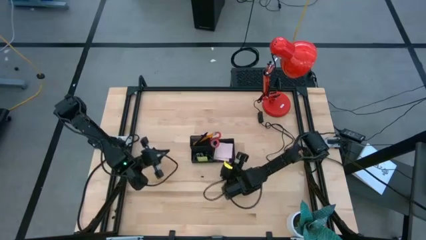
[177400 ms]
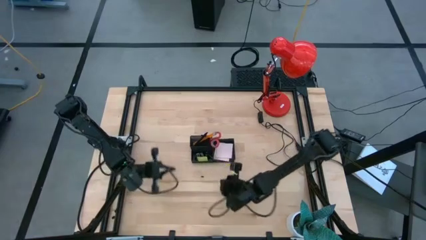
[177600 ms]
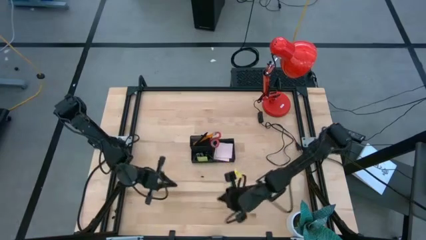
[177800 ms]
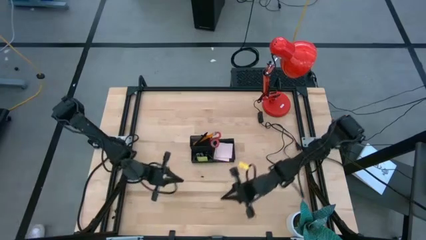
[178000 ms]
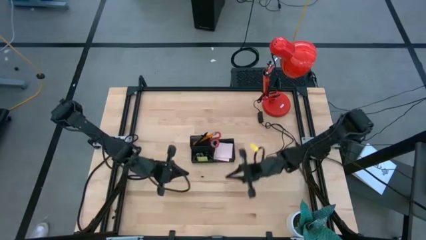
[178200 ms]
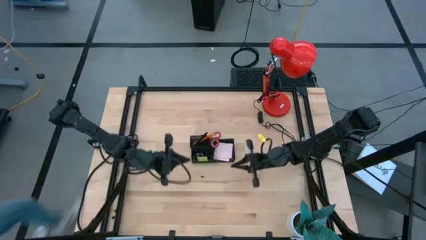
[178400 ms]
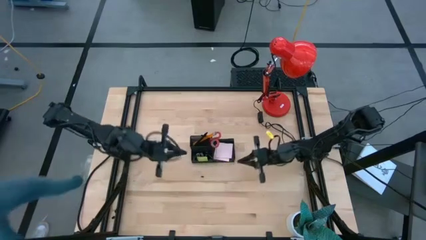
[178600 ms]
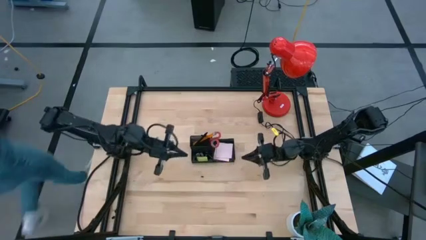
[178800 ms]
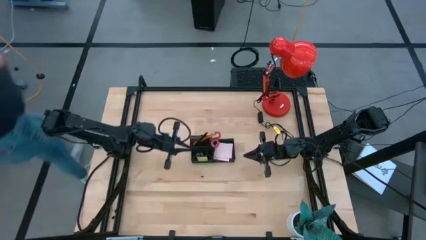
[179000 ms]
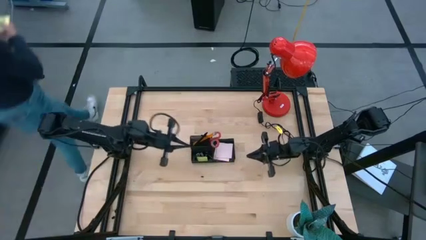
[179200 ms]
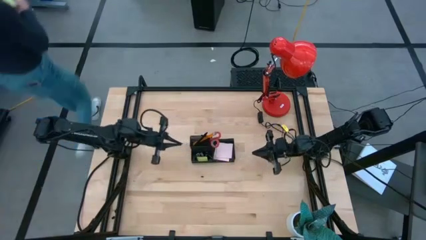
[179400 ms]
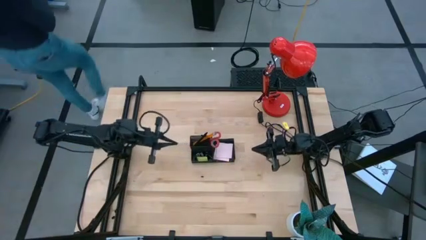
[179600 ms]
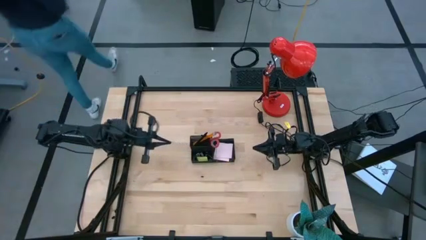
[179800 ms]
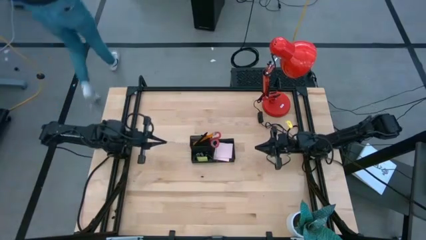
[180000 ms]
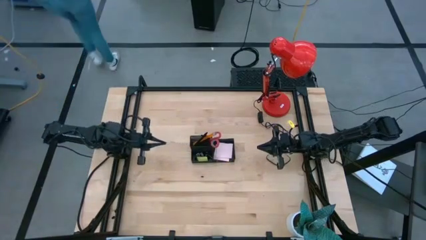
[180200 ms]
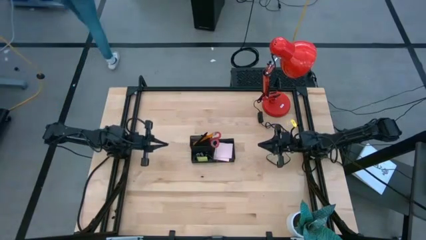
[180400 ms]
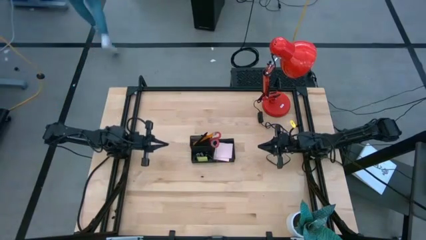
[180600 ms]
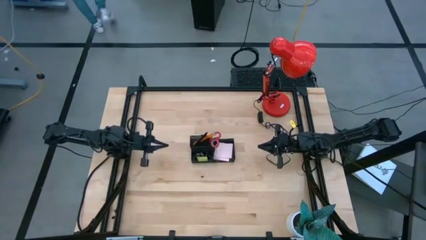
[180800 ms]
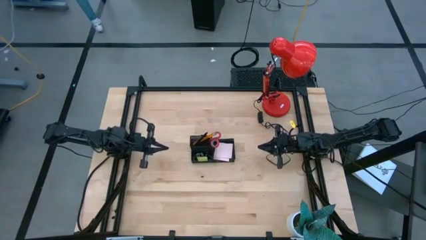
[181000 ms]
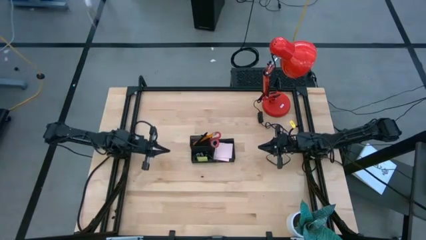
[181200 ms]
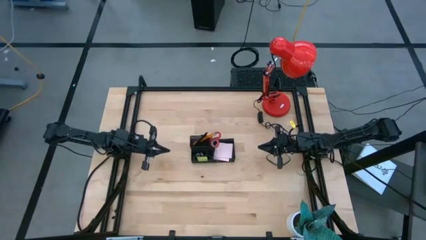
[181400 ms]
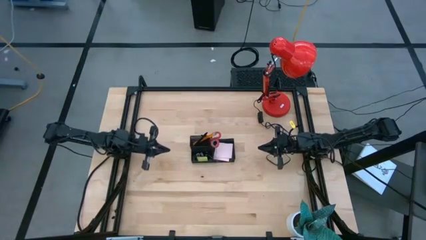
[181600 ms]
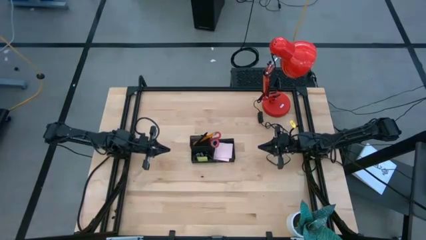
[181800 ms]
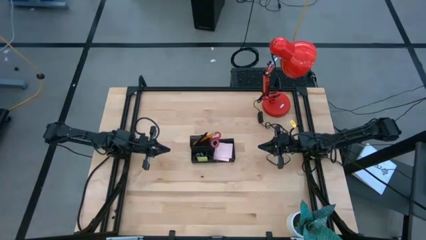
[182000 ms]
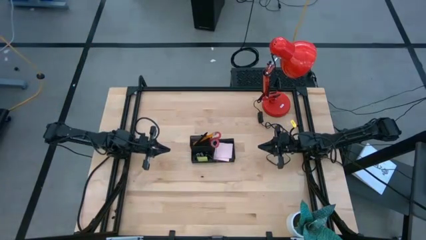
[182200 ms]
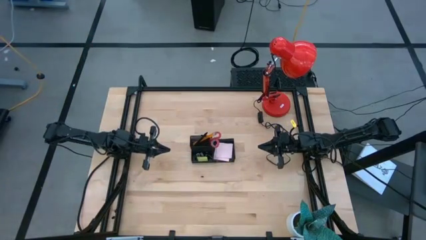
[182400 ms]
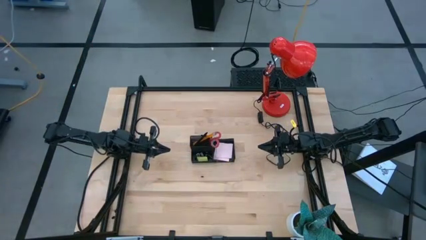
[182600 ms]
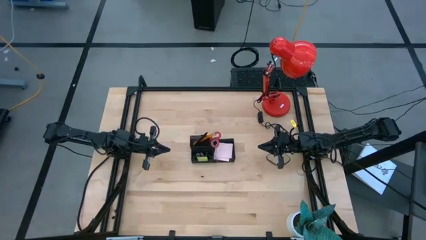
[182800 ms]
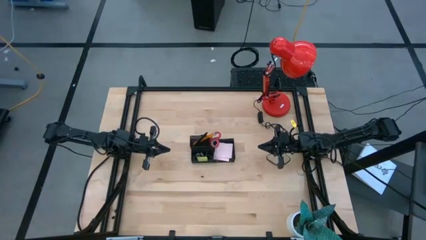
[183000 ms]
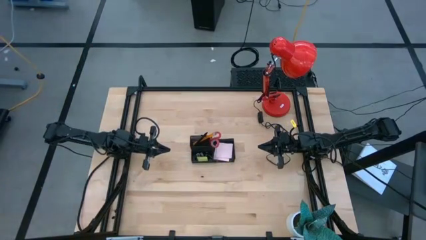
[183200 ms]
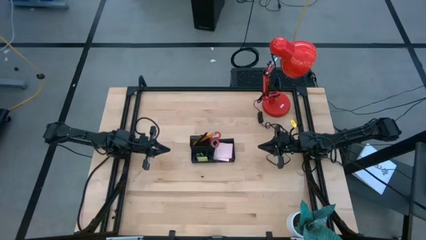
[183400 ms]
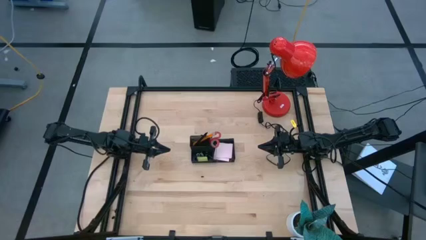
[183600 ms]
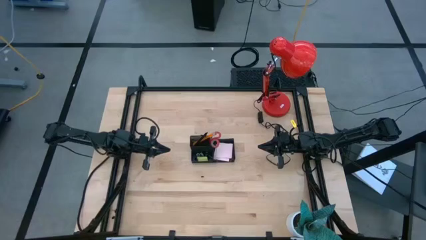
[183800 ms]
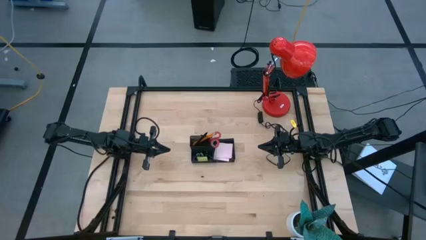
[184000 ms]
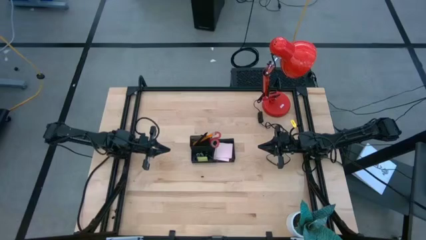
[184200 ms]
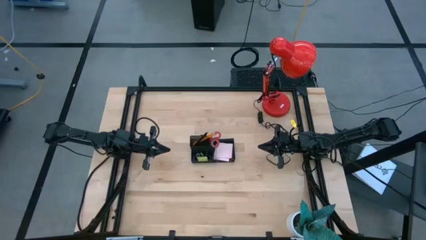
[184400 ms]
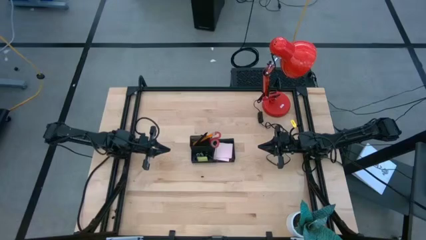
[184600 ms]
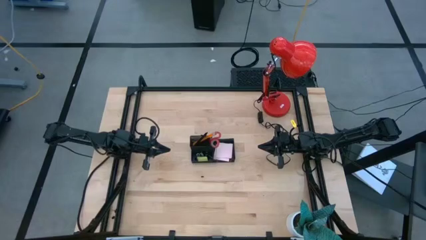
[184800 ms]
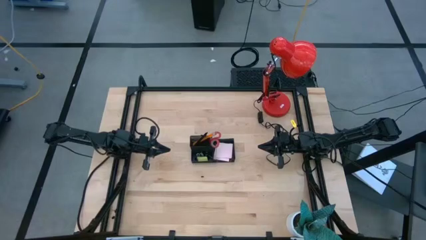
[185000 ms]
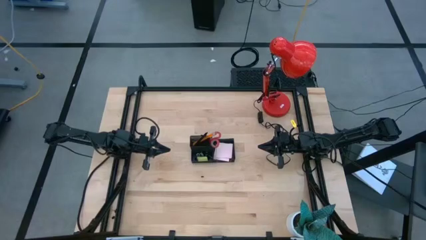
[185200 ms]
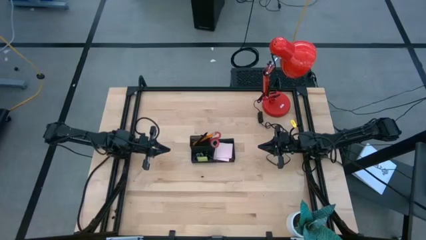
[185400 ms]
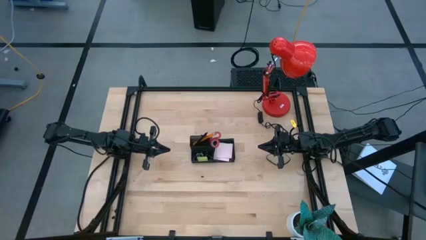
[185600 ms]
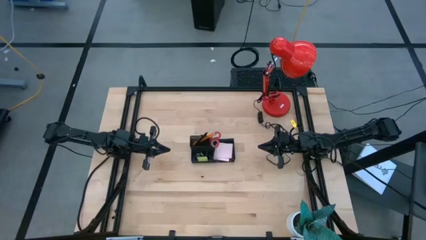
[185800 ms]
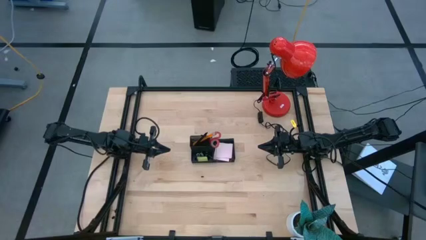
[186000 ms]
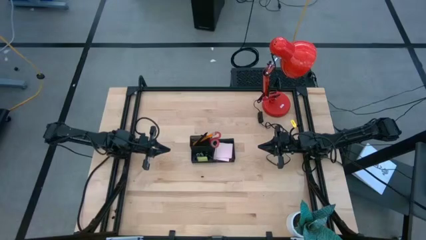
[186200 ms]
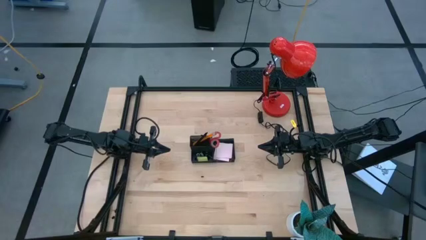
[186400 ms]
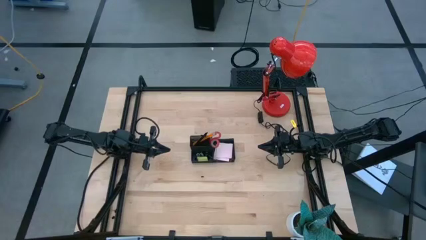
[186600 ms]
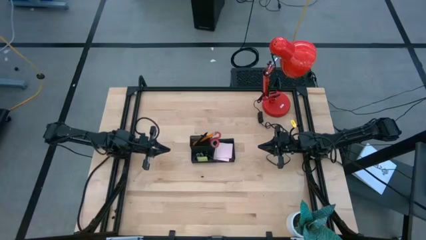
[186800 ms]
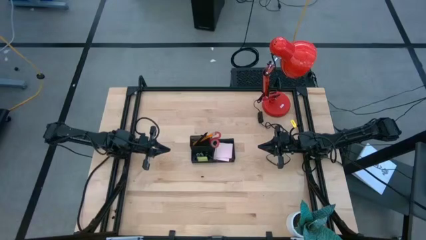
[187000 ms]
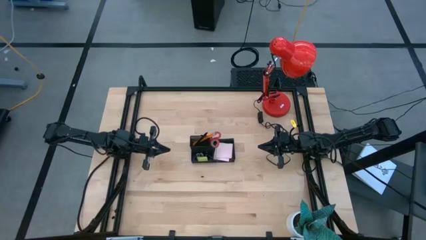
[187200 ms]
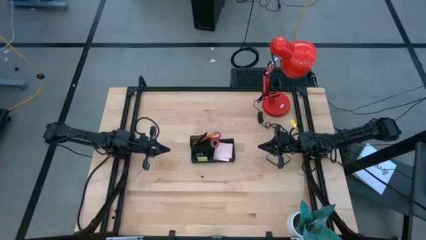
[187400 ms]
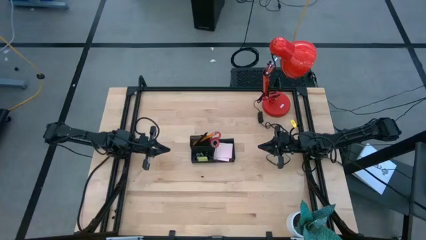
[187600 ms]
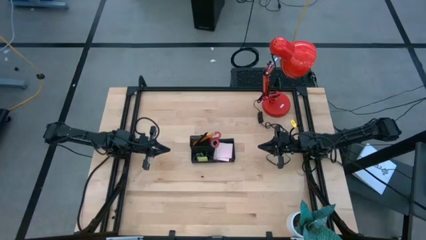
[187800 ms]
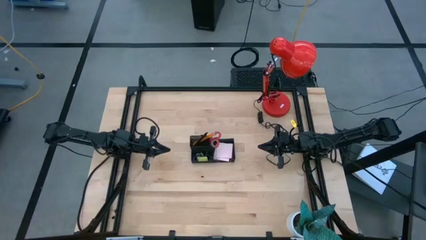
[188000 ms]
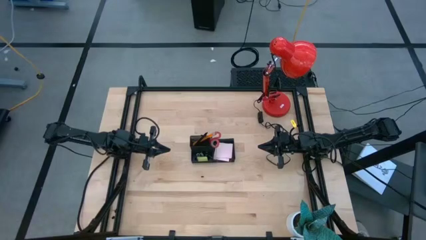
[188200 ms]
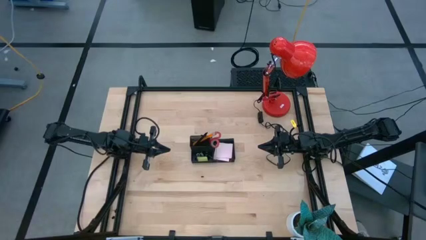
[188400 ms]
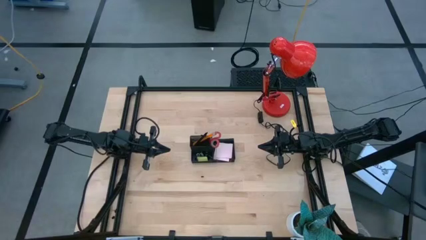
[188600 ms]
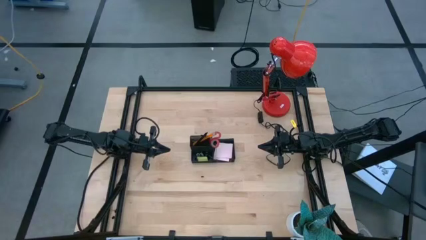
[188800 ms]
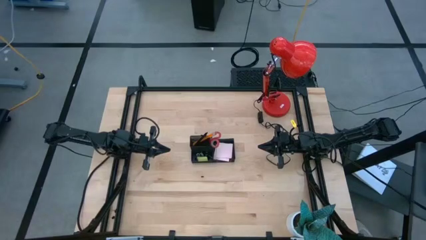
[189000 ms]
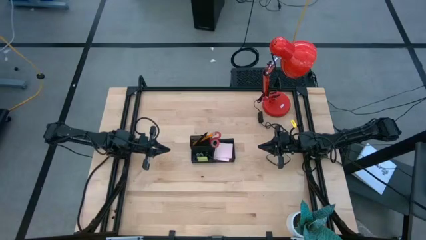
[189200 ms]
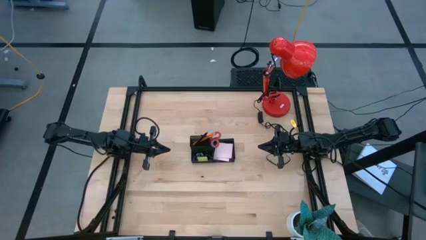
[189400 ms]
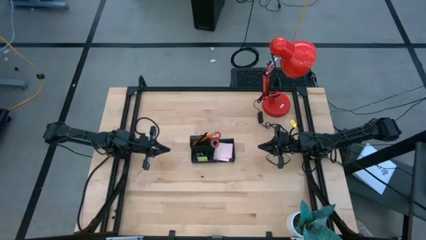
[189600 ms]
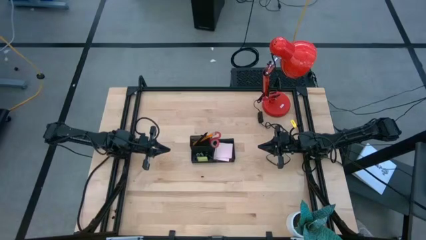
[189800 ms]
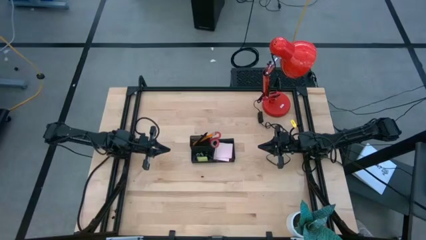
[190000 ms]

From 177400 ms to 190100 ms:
Task: Pick and place office supplies into organizer
Return to Home Position

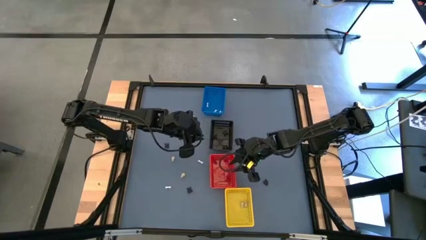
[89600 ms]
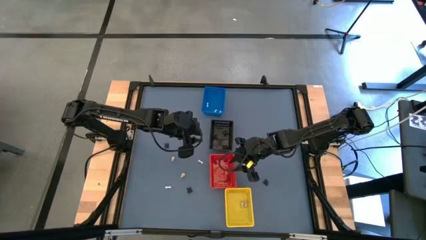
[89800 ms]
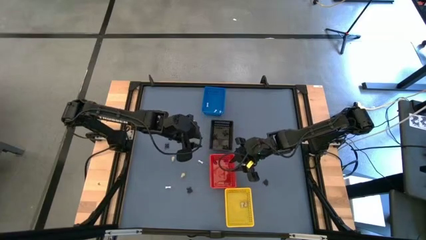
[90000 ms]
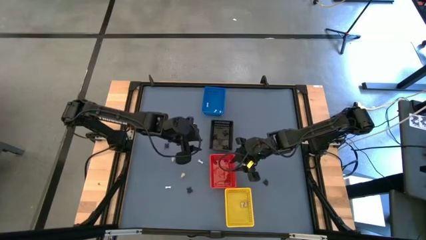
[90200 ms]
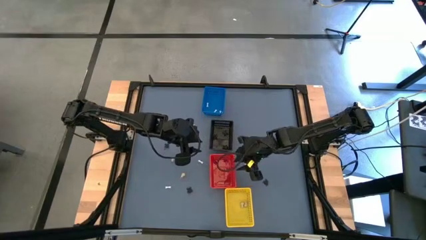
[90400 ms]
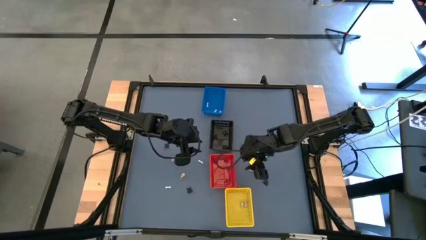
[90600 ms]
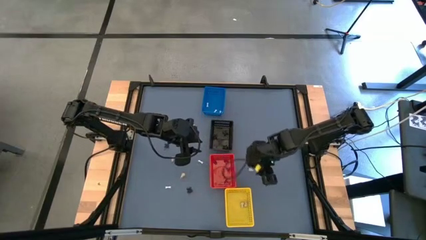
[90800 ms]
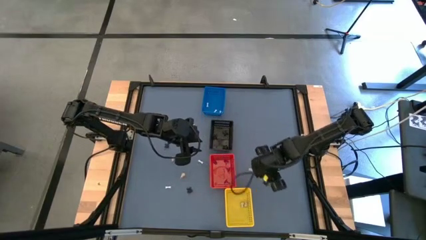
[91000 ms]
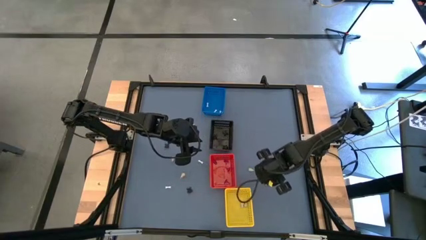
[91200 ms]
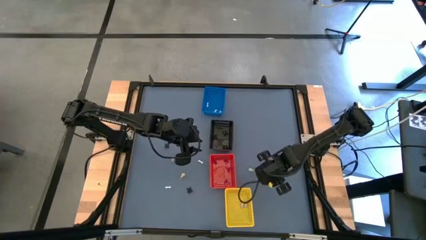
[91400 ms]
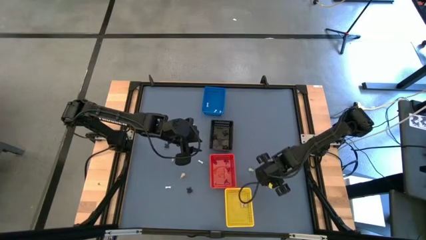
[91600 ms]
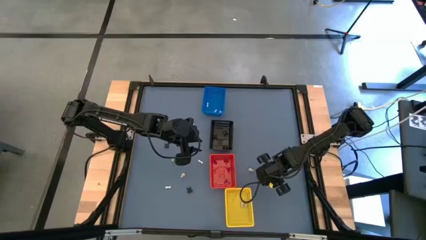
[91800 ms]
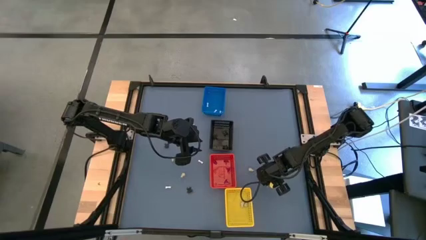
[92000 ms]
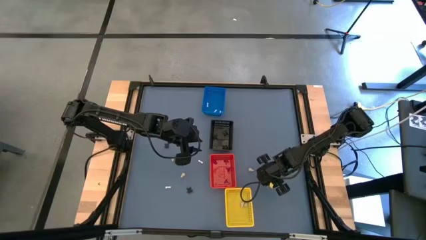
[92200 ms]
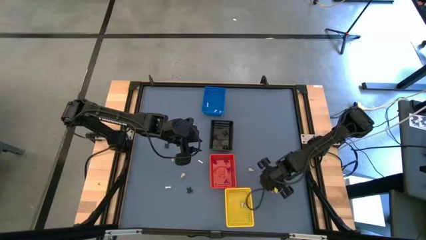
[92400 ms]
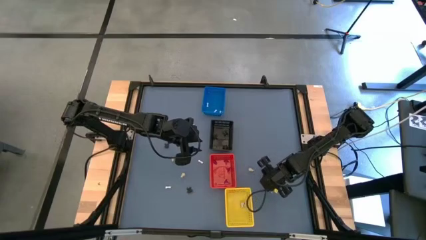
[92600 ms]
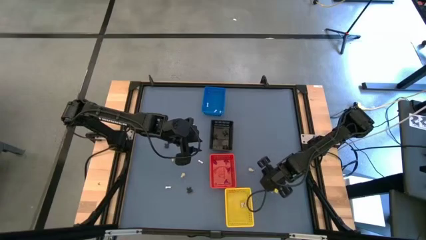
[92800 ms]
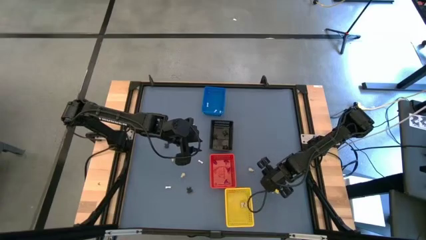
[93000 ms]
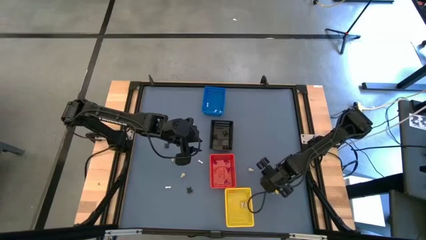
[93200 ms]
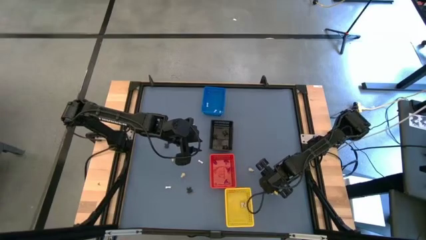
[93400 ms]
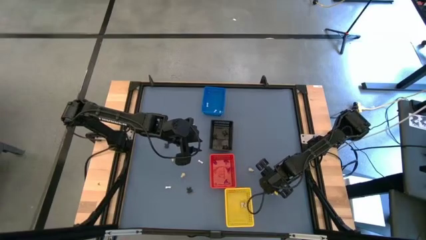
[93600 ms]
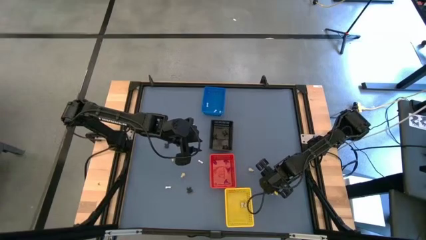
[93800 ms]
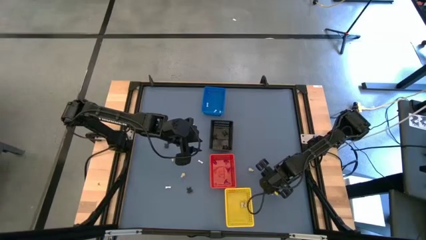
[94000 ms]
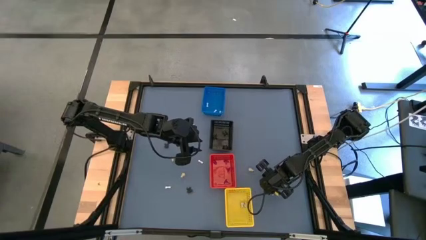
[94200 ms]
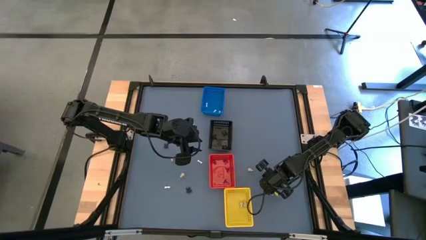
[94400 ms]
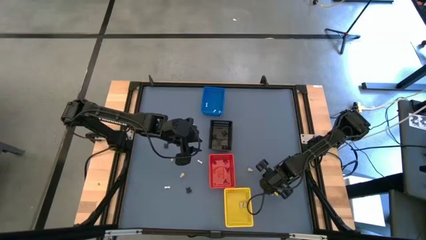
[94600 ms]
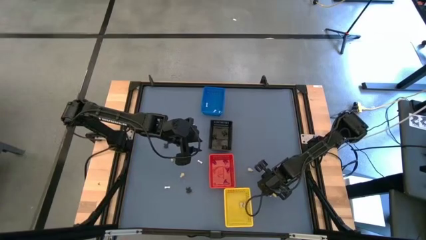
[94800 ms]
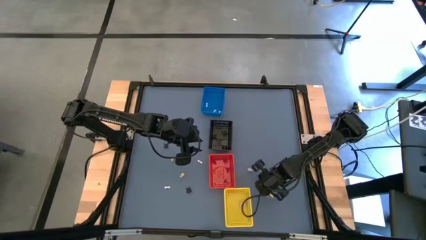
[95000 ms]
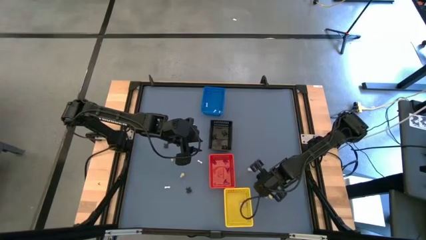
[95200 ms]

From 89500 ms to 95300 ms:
Task: Sort Halloween decoration
Put the black spider toy into the black bin
